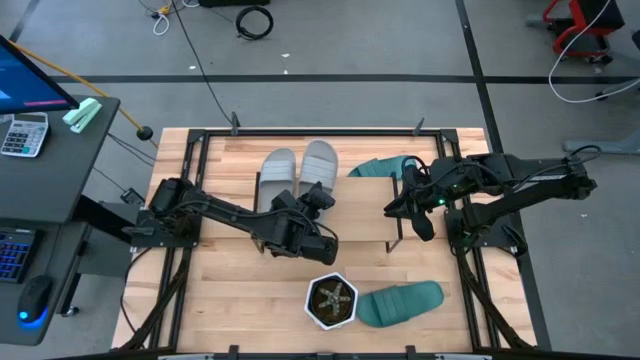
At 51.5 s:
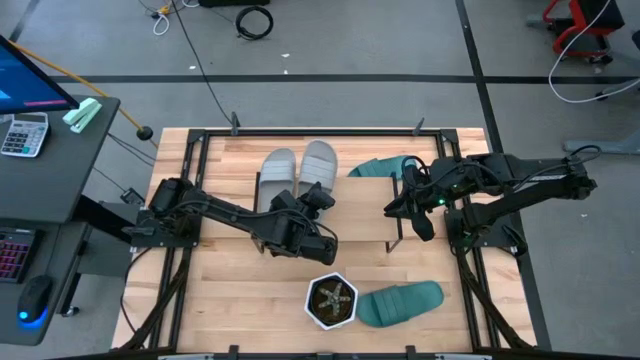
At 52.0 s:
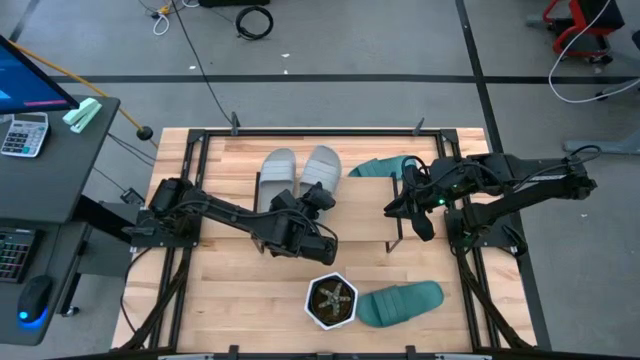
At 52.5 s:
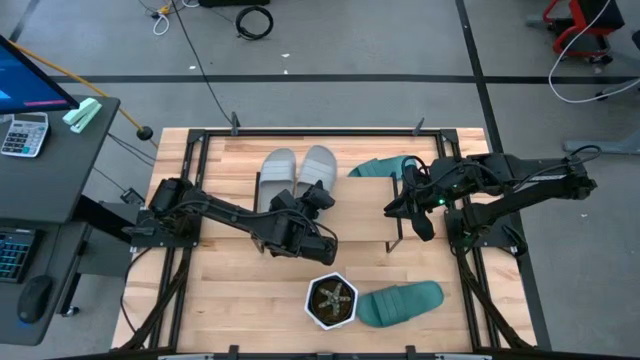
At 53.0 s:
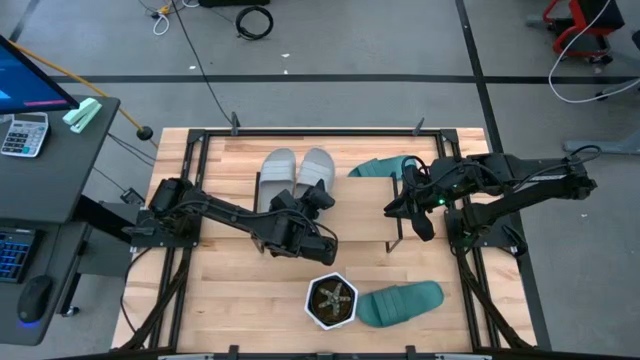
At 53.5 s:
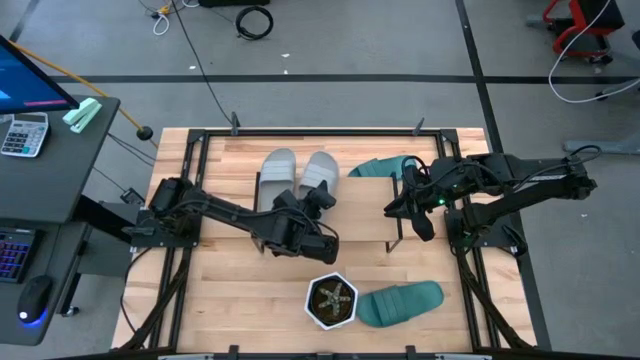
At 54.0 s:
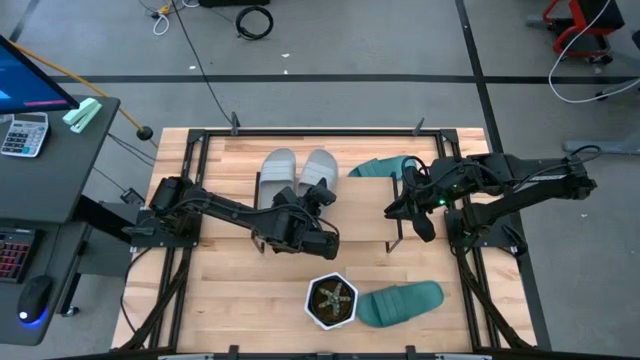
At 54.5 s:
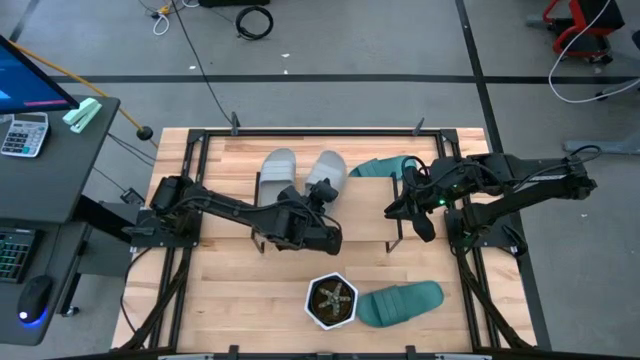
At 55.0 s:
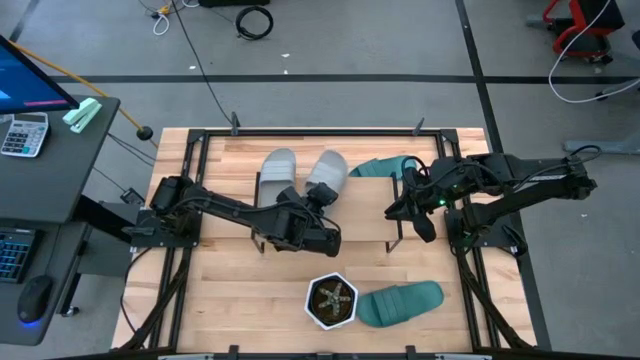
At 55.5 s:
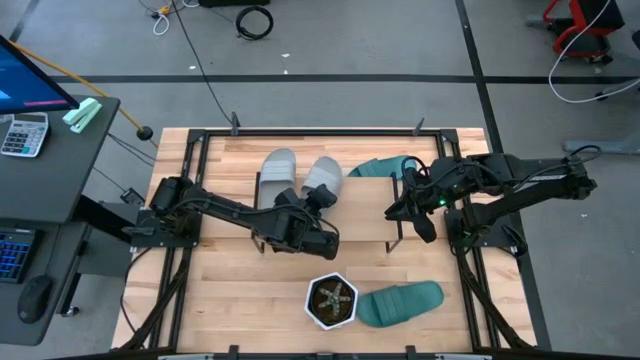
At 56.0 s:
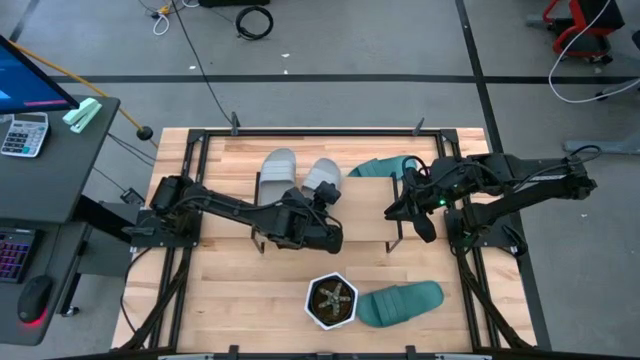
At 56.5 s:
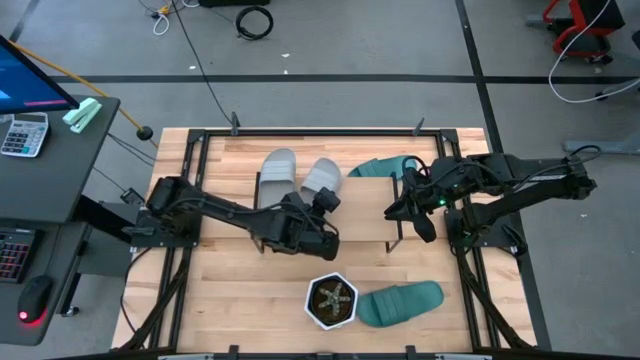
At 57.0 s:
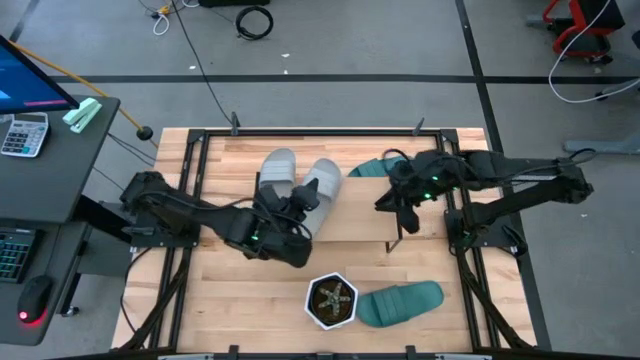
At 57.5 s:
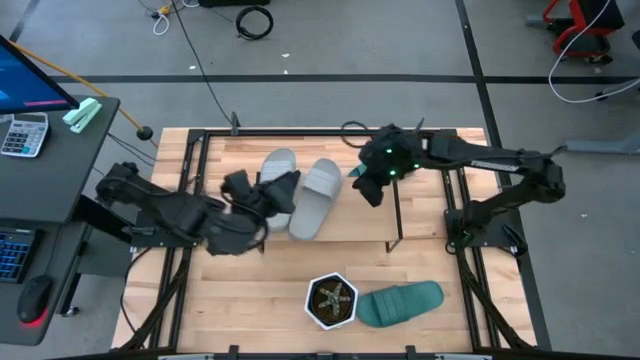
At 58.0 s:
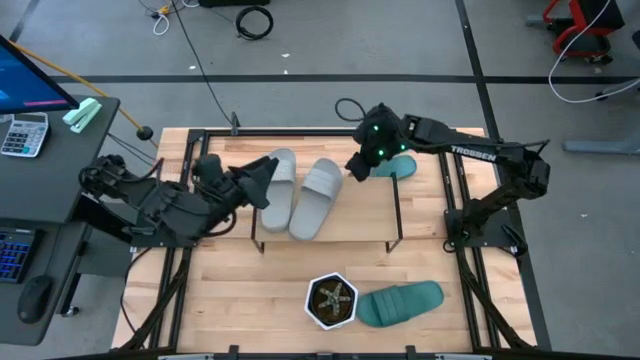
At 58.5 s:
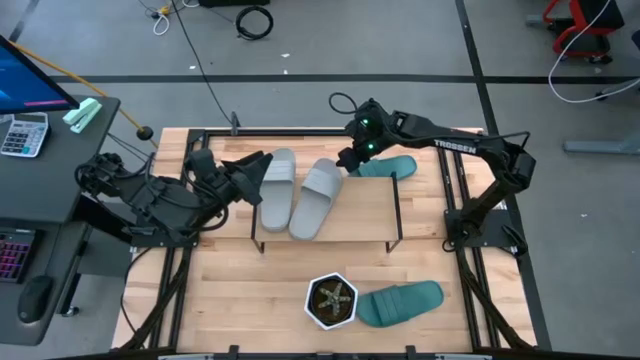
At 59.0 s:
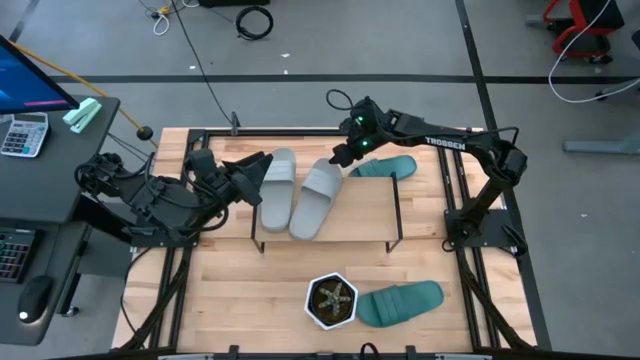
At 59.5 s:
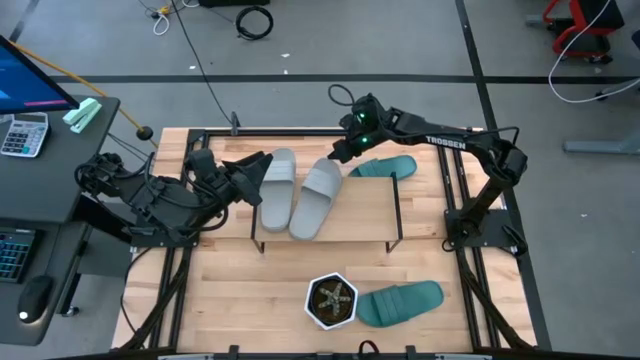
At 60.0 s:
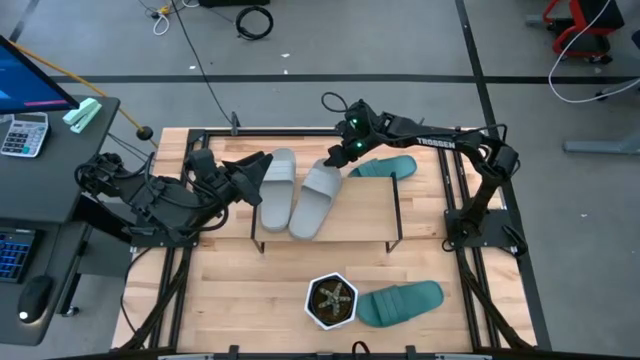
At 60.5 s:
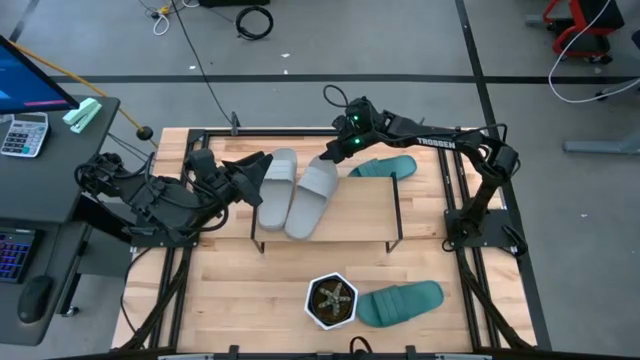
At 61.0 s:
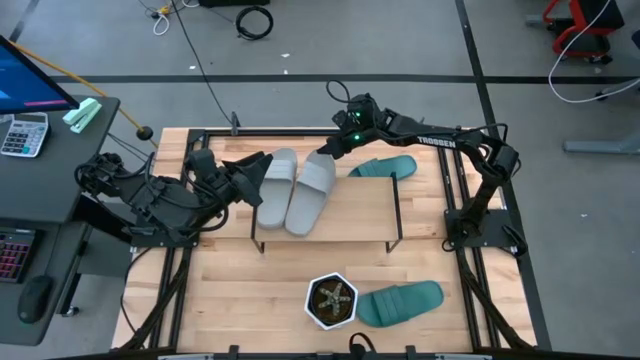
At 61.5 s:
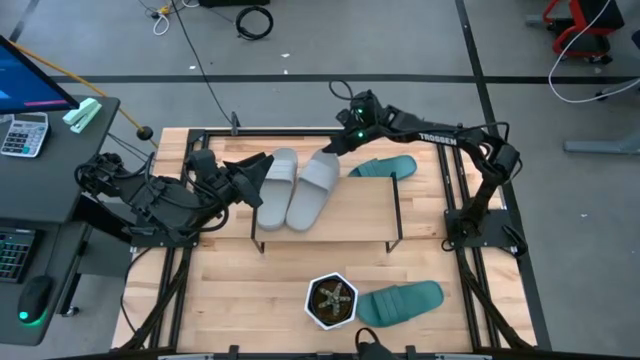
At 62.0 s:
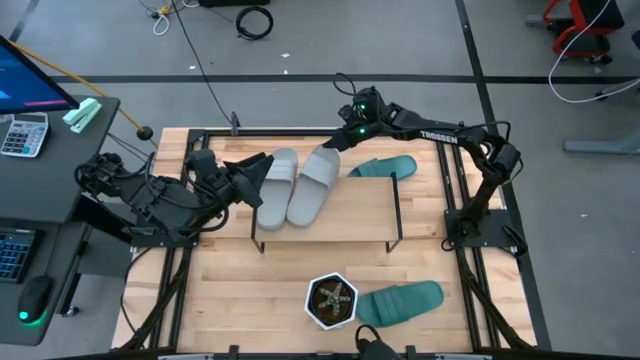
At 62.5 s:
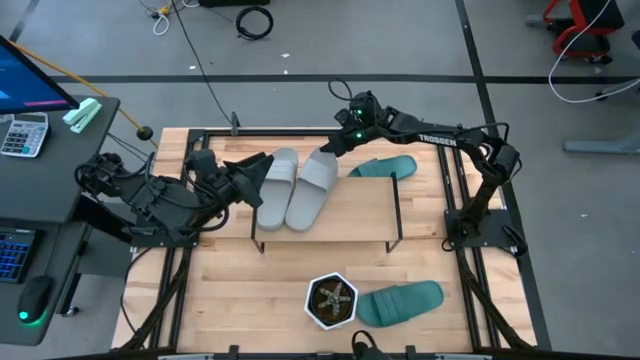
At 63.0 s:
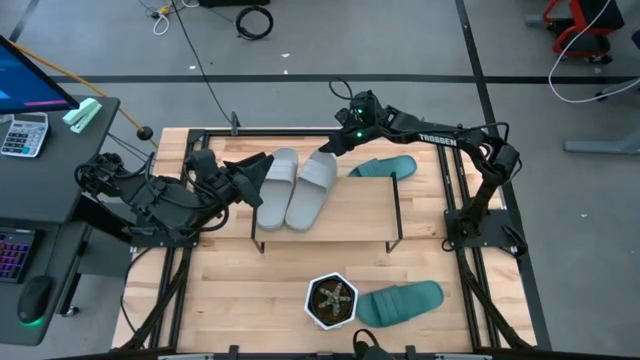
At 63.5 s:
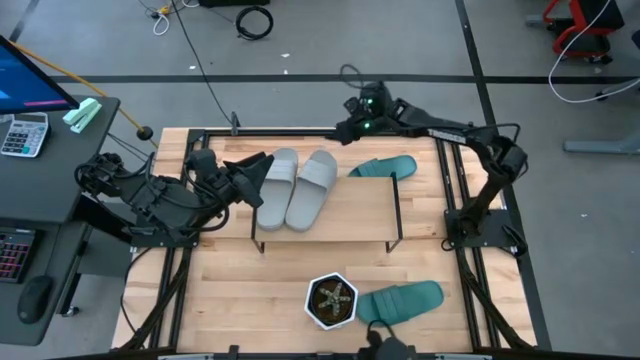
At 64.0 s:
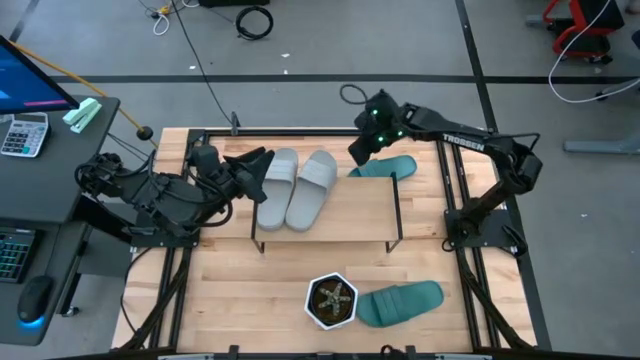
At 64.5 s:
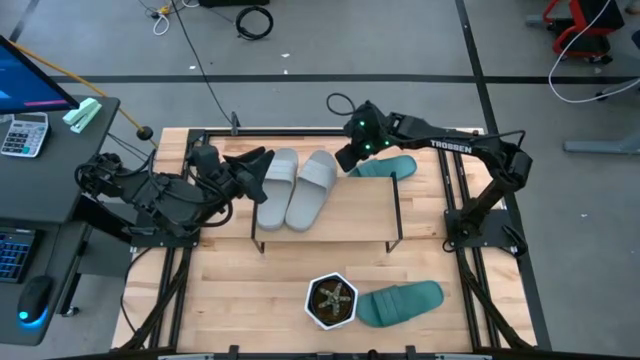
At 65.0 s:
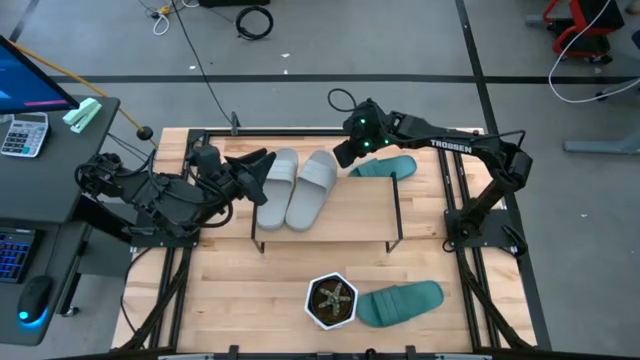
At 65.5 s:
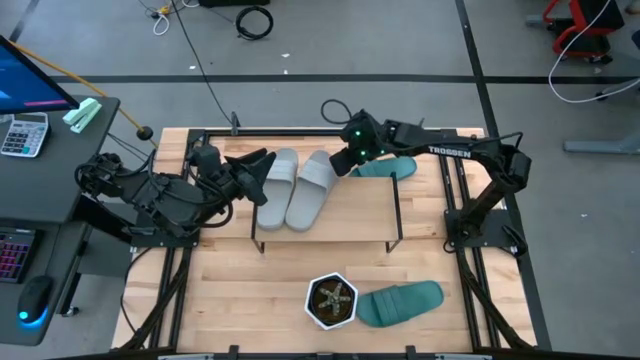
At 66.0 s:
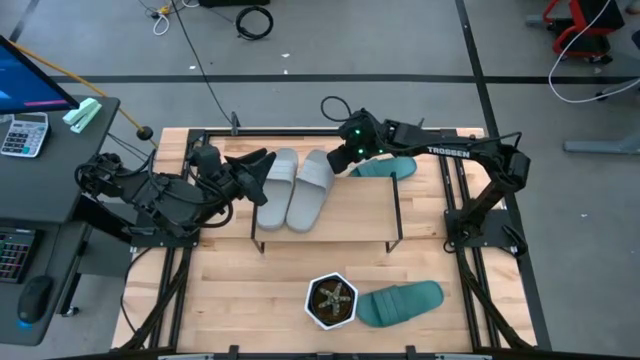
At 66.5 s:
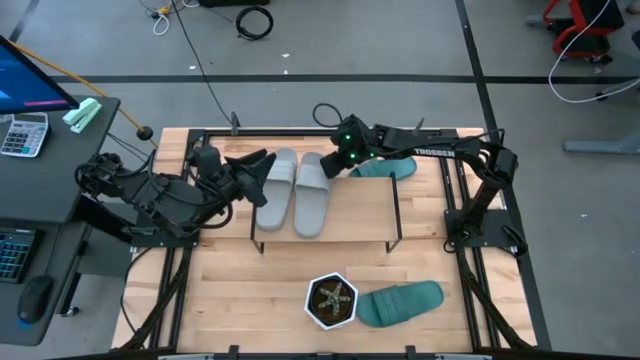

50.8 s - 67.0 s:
Task: Pick and place slides into the shelf
Put the gray slide on the shelf aligned with the other gray slide

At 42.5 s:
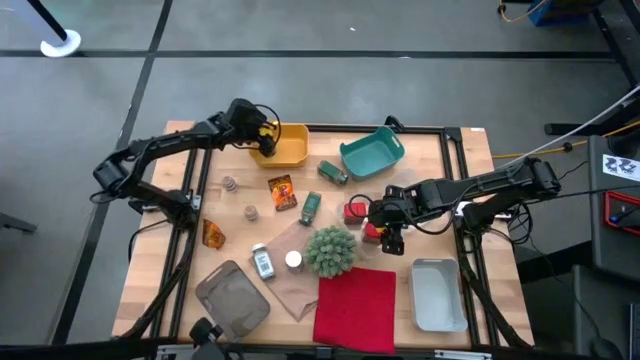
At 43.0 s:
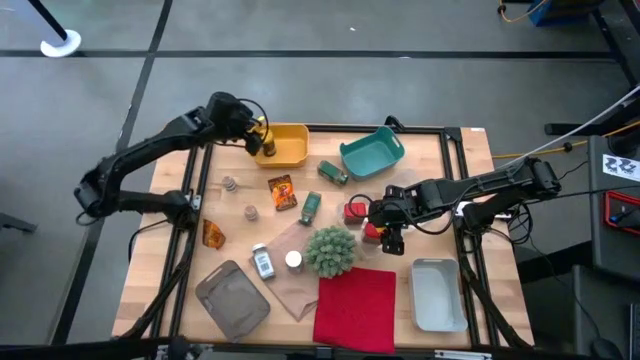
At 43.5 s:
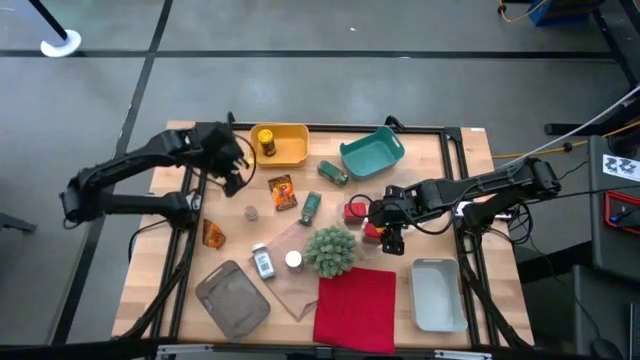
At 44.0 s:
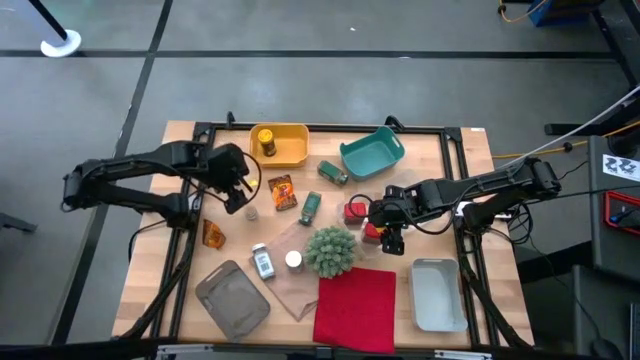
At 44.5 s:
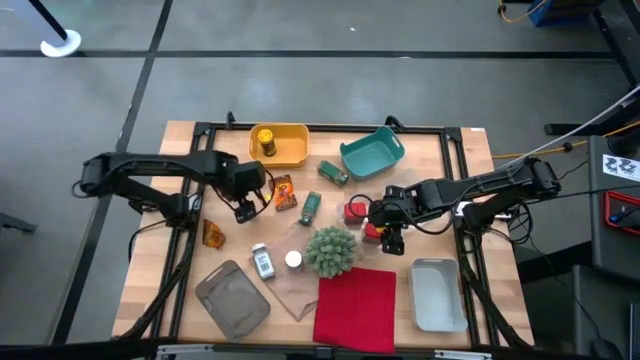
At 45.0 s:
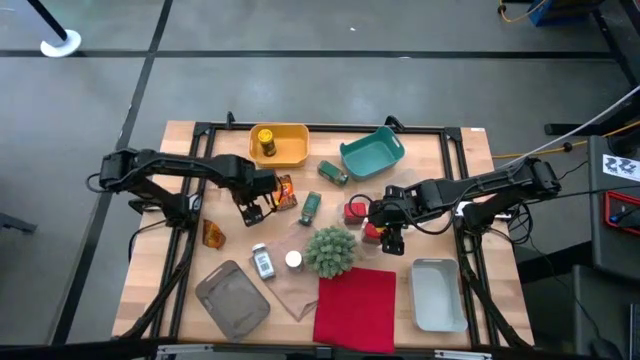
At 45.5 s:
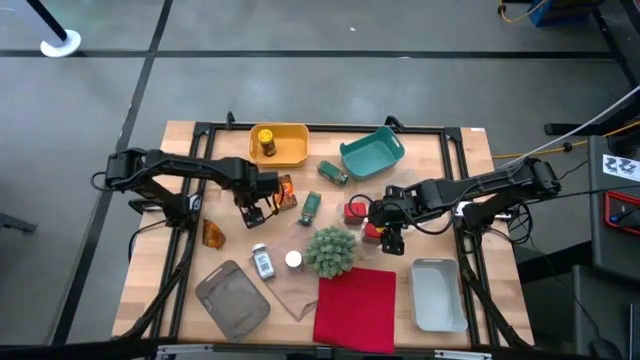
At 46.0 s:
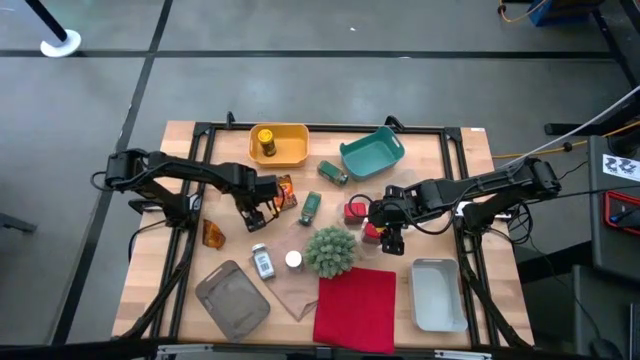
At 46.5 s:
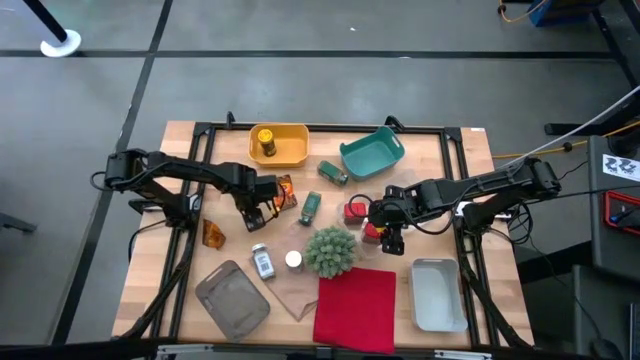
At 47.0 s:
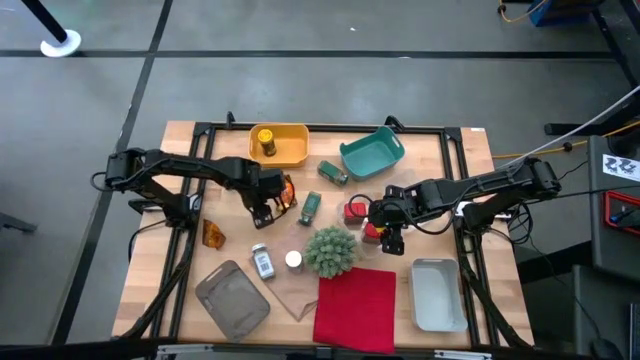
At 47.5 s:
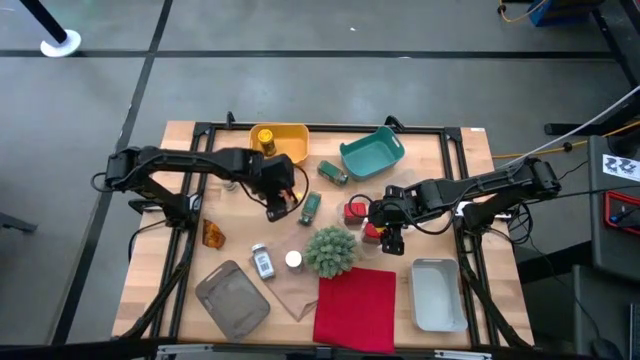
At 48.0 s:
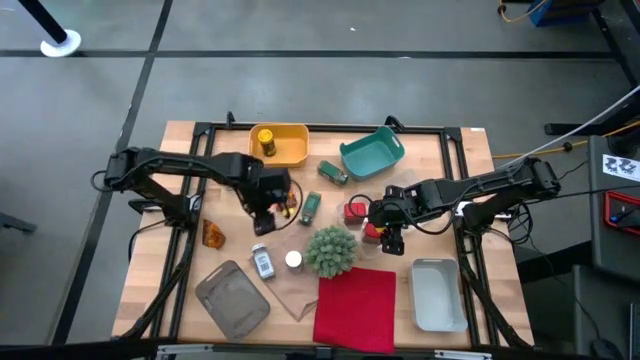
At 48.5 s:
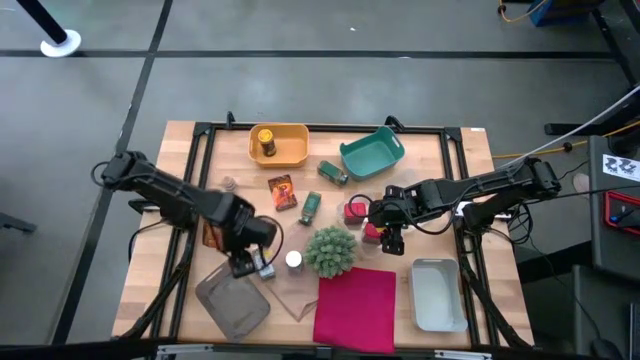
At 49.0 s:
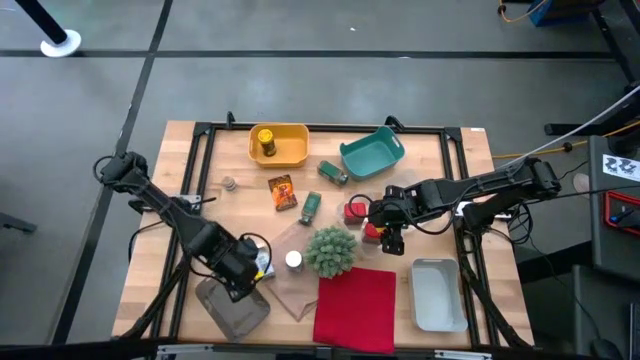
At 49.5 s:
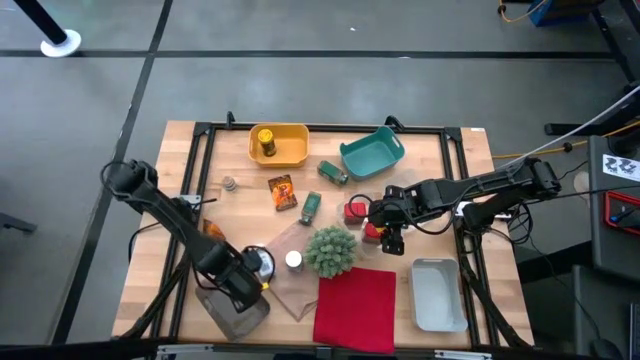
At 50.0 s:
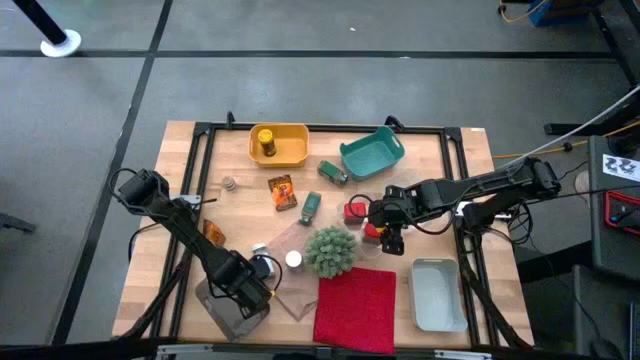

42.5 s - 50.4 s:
Task: Sort spices by type
Put the bottom brown seasoning bottle into the black bin
